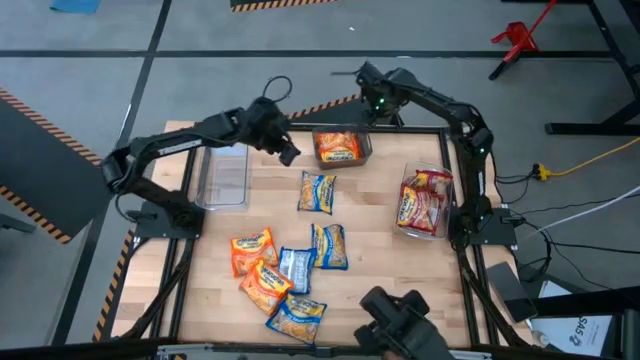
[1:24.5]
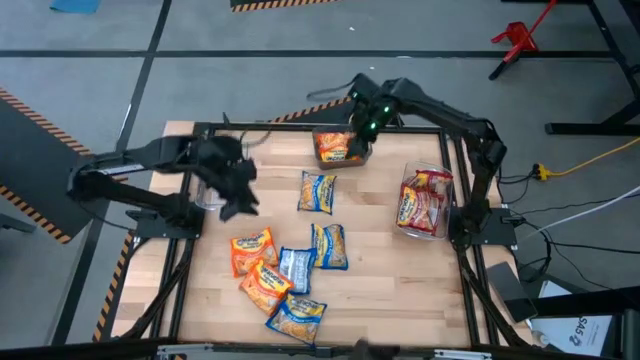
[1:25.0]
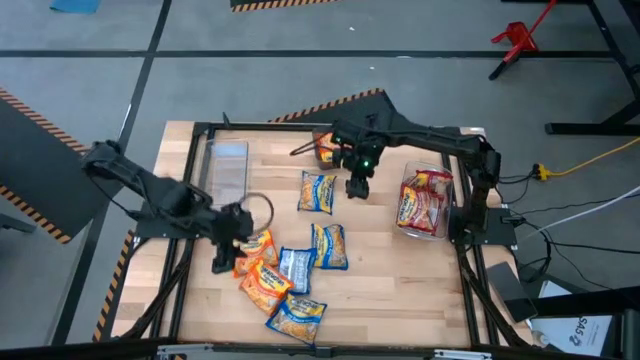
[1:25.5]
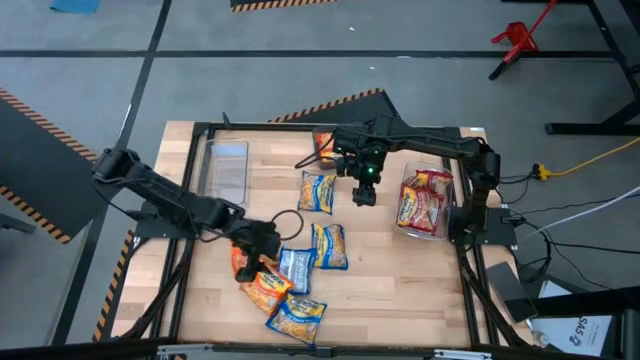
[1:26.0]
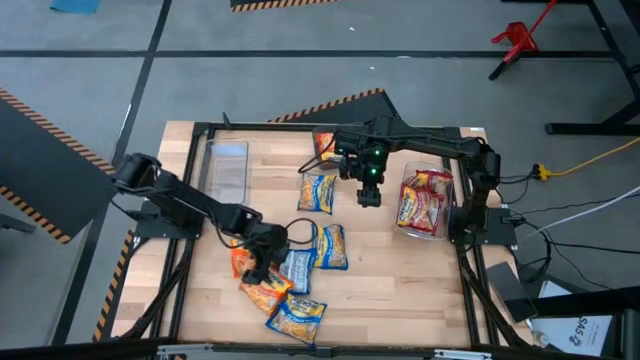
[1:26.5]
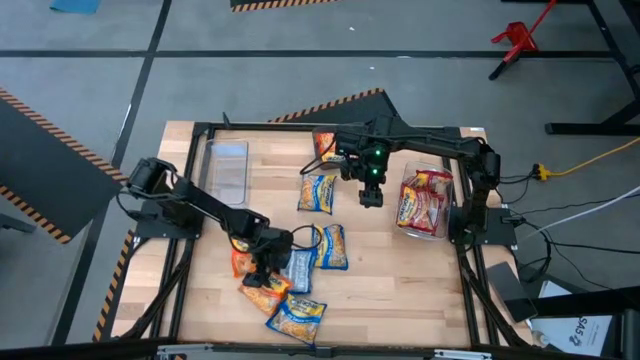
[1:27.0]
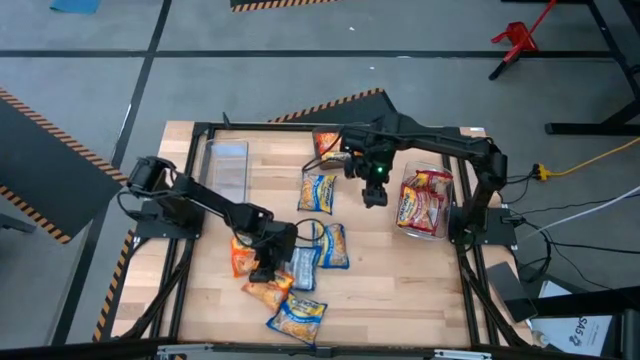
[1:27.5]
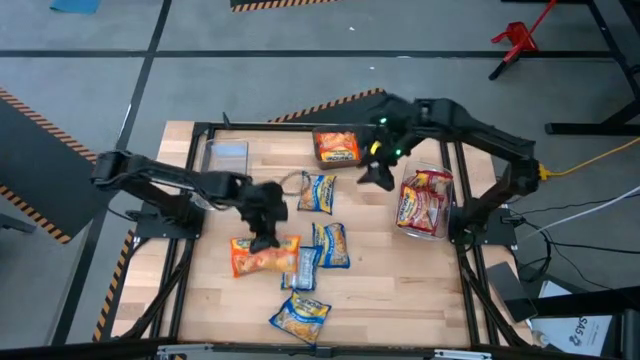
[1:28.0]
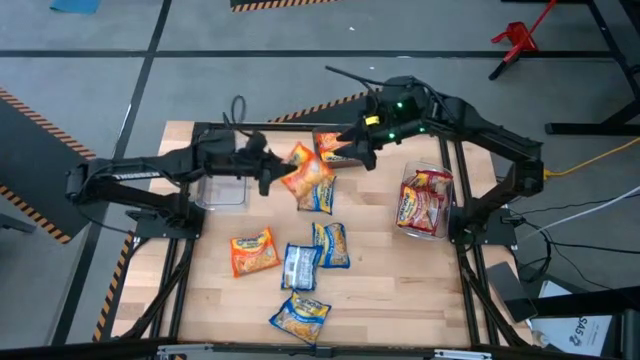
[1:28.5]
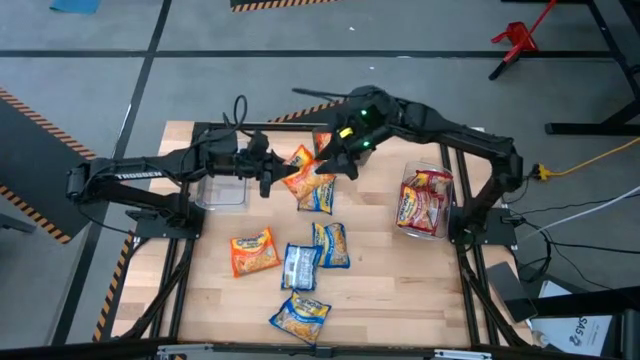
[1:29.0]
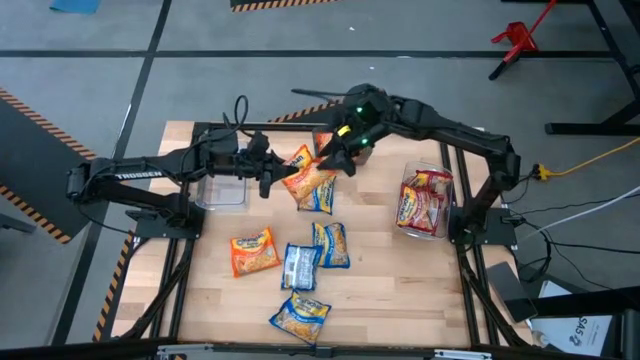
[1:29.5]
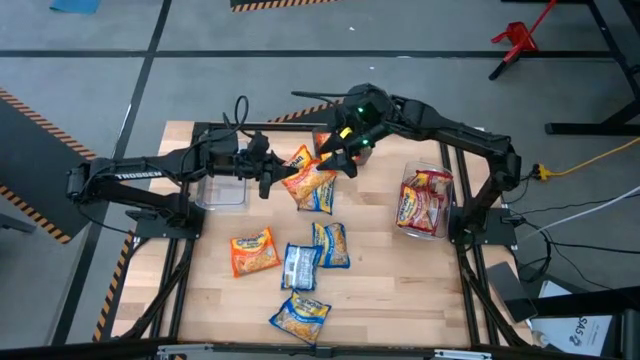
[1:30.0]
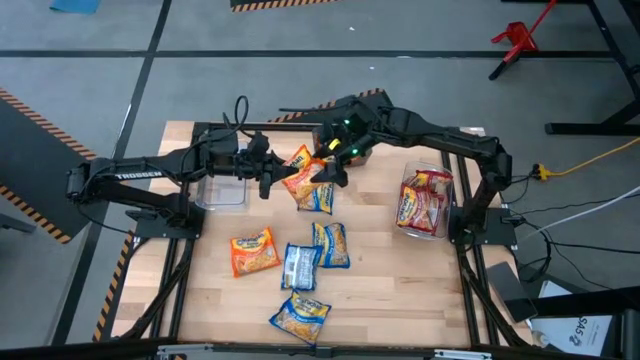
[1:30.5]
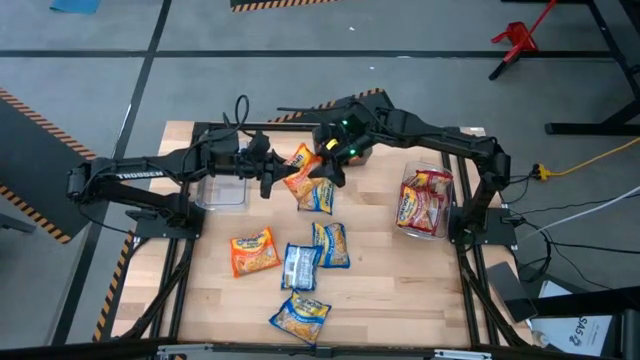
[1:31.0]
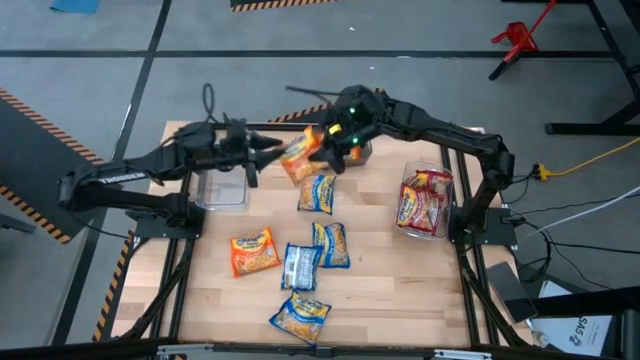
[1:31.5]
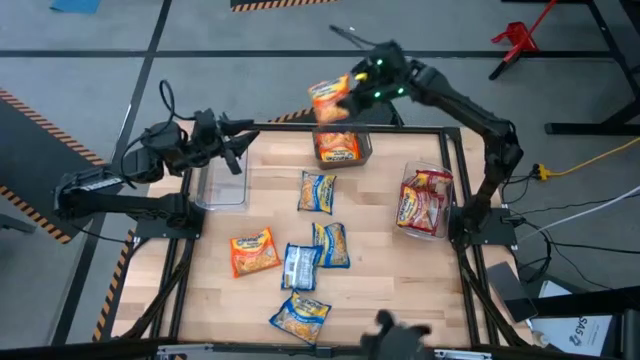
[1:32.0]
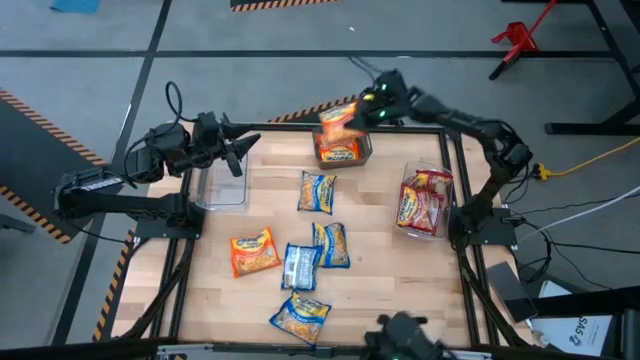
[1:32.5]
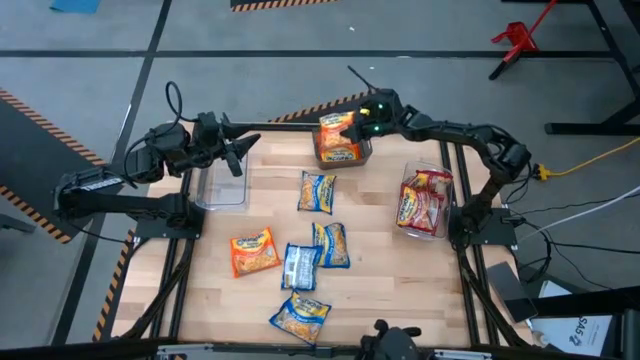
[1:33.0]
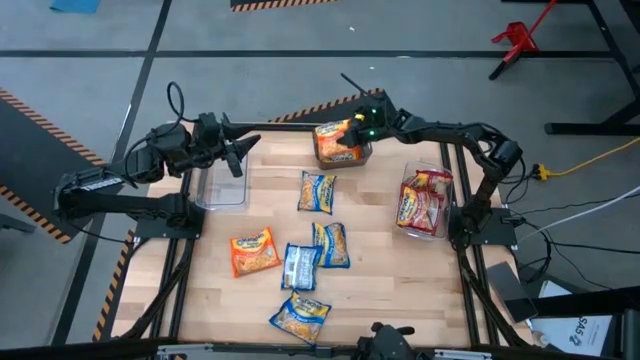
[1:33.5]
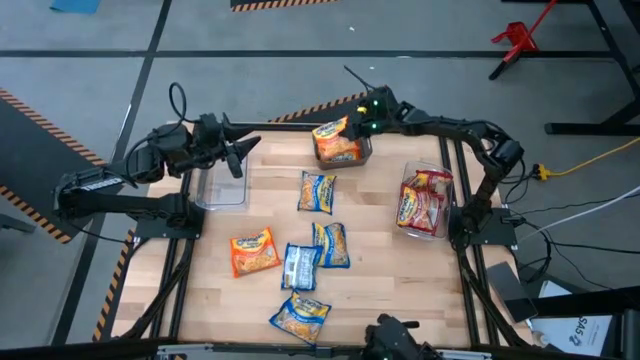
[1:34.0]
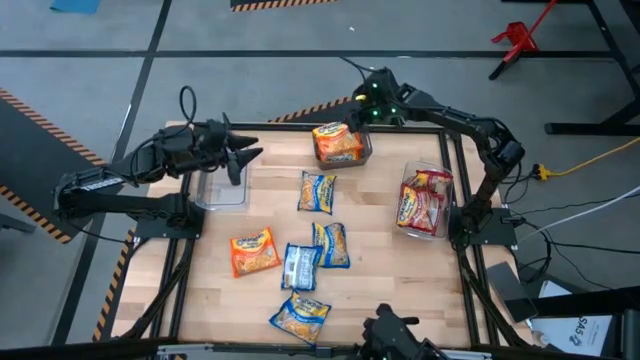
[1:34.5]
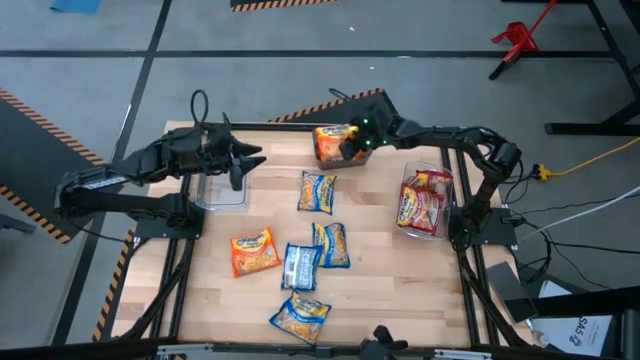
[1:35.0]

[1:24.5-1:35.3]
Task: Sort Maruchan noodles
Put the orange noodle pack into the black bin

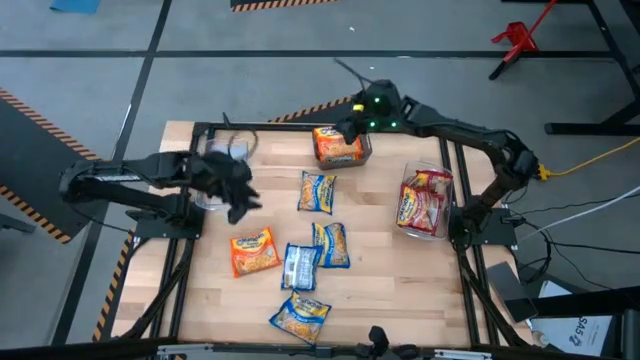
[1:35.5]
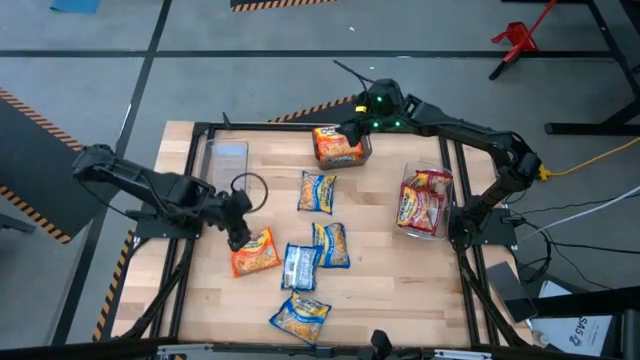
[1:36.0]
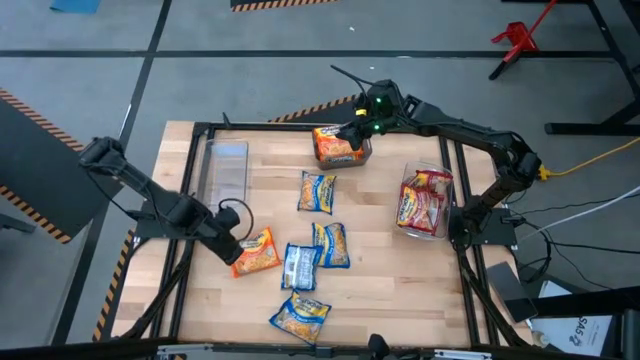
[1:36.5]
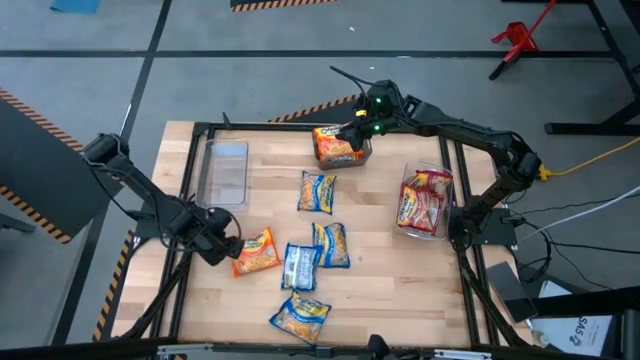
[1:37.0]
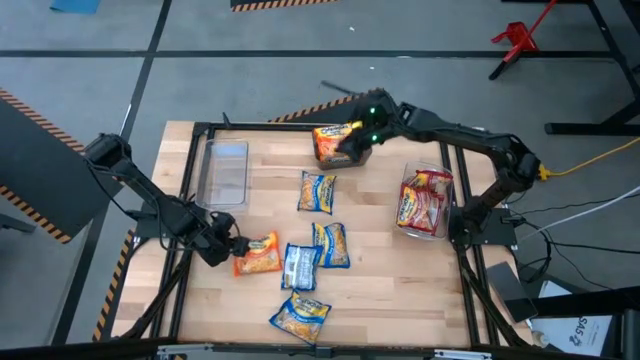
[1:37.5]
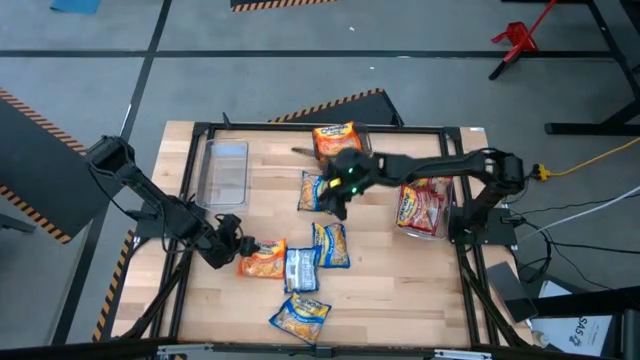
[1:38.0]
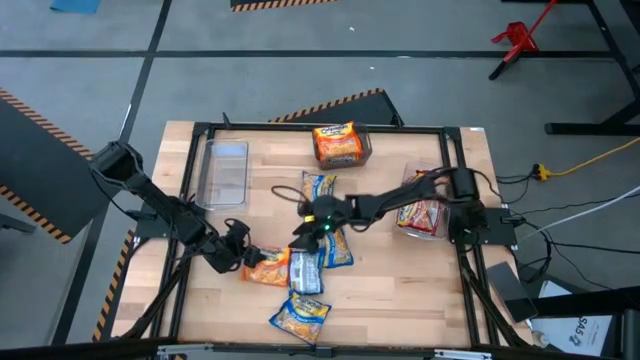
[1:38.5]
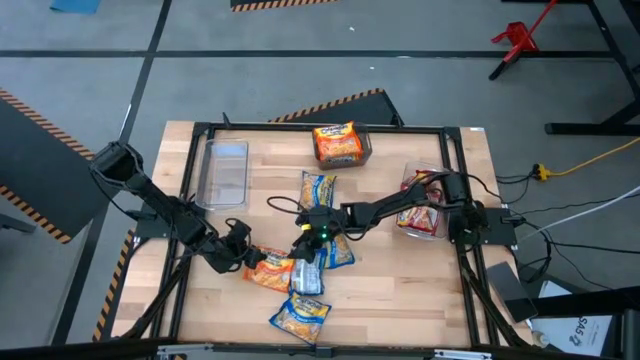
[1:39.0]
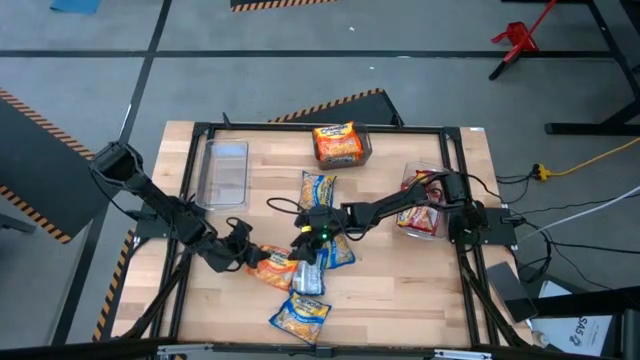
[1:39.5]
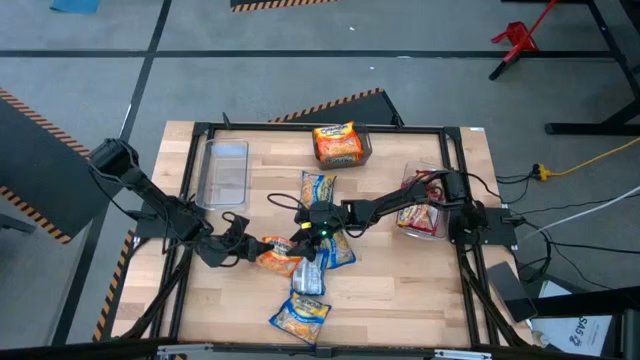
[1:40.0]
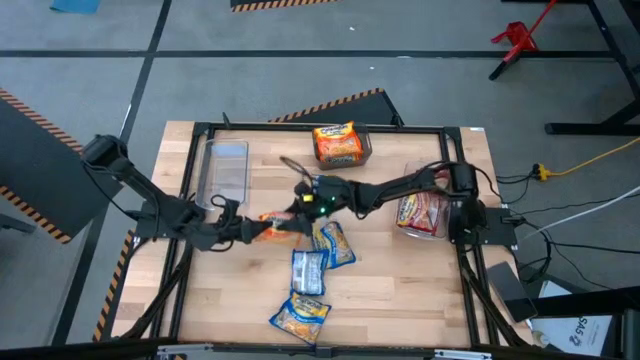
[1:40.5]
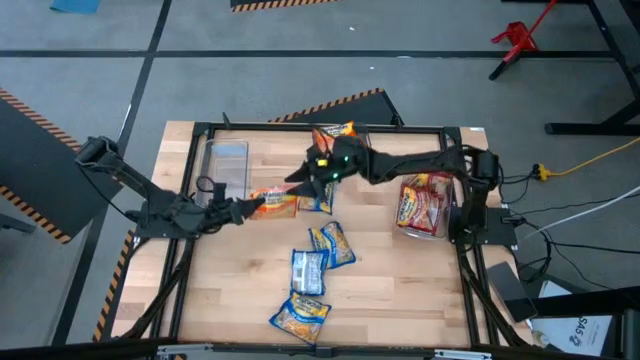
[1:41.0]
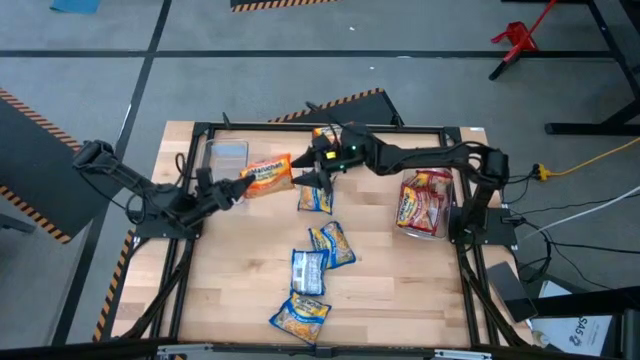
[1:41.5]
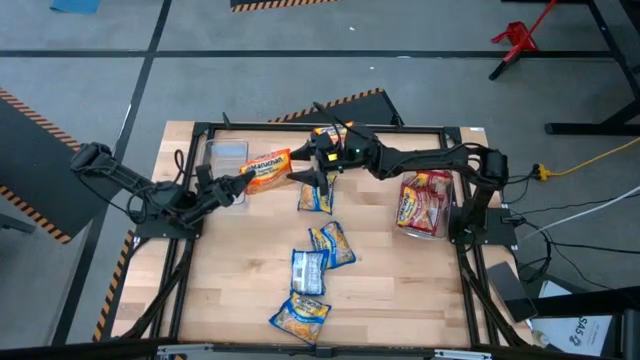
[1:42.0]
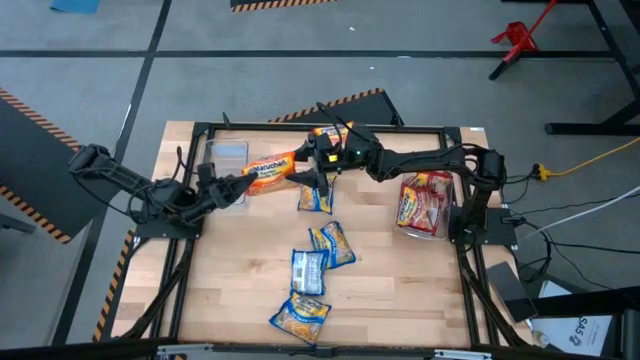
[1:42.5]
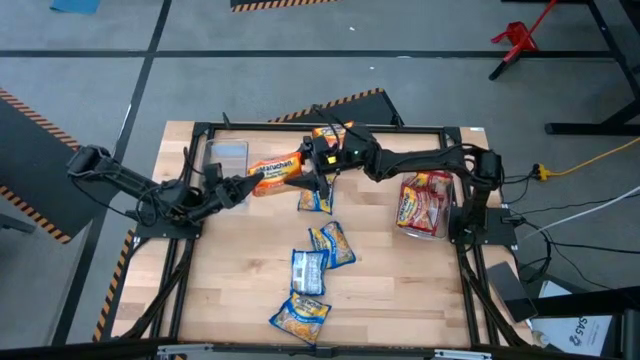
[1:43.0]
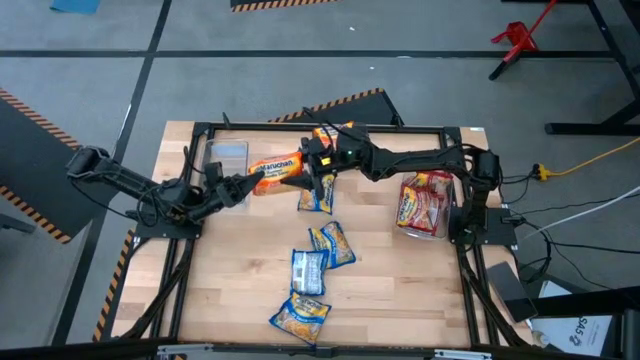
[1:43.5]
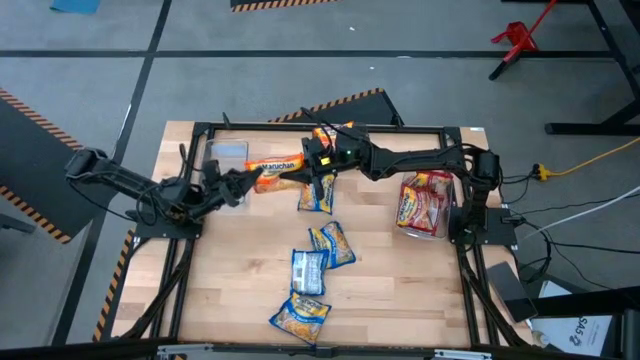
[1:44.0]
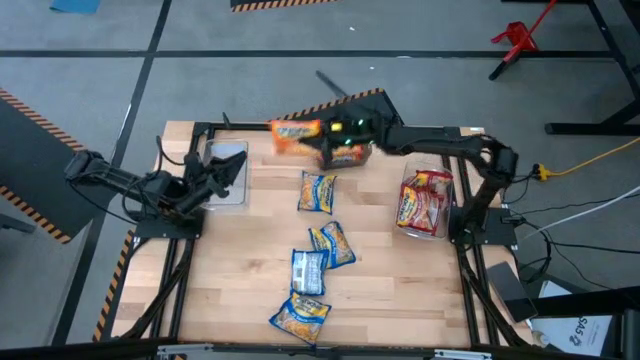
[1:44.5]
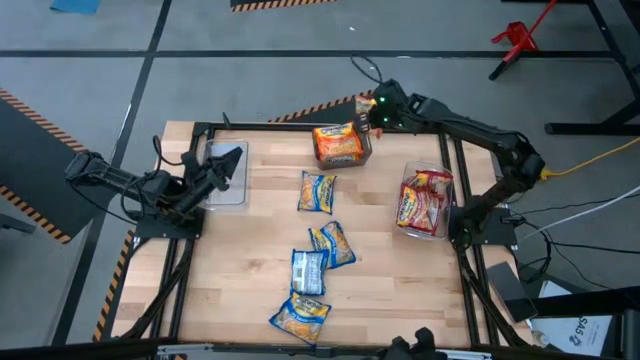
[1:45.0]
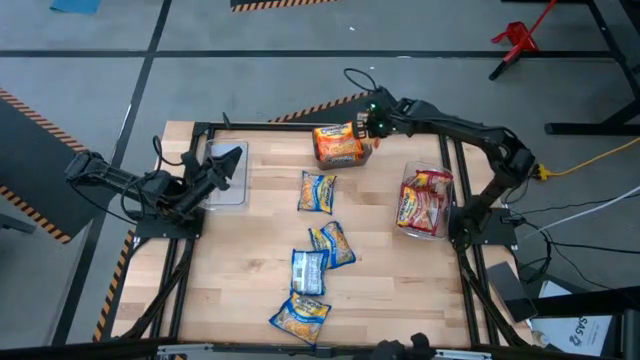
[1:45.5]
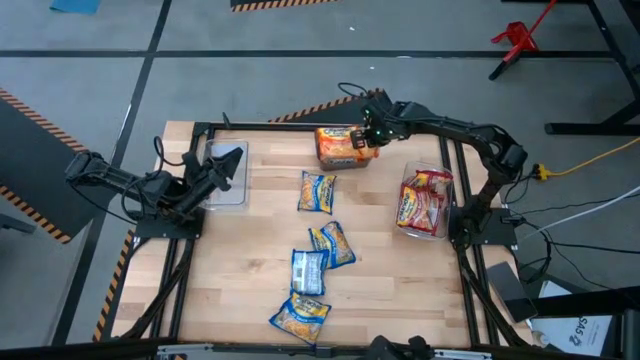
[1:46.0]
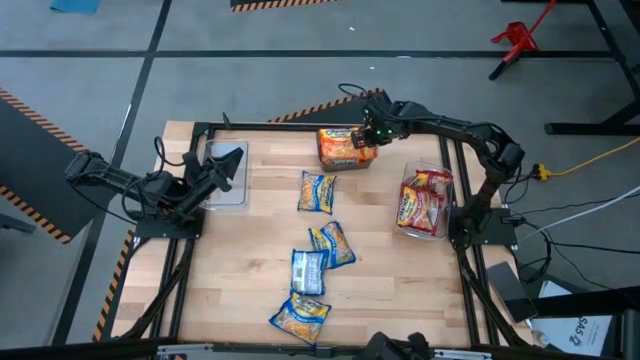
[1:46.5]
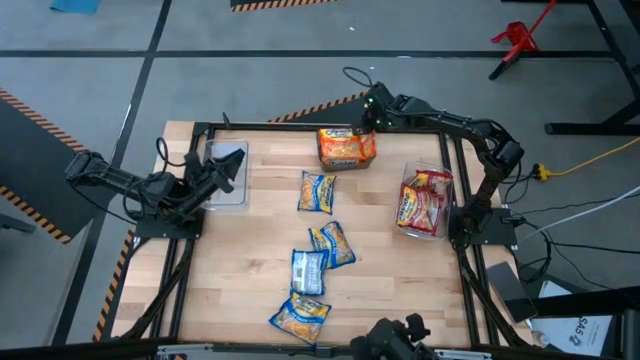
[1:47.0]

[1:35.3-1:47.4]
Put the orange noodle pack into the black bin
